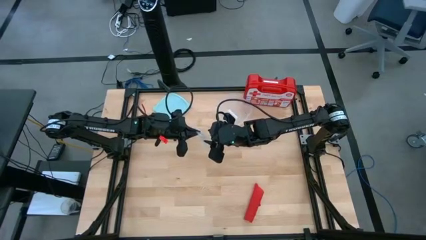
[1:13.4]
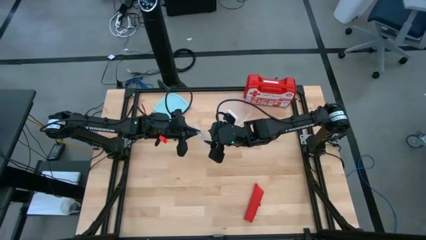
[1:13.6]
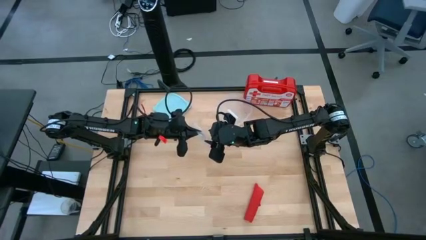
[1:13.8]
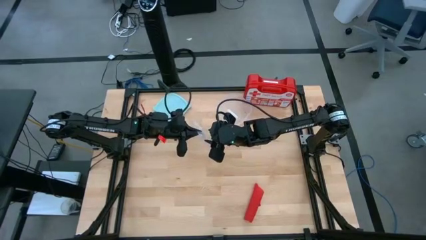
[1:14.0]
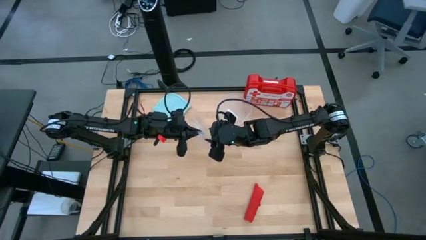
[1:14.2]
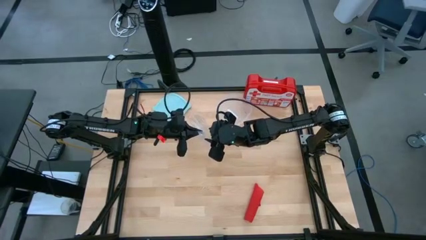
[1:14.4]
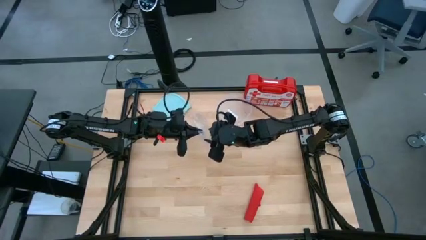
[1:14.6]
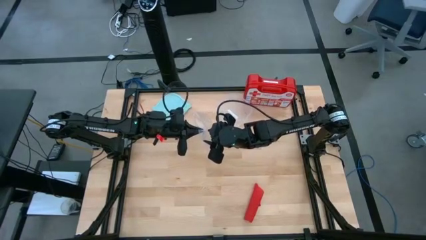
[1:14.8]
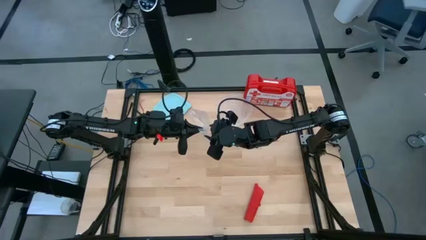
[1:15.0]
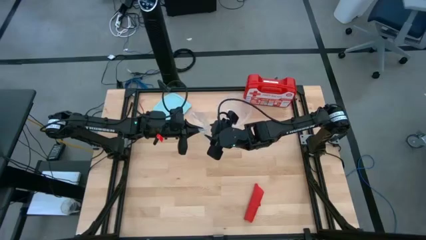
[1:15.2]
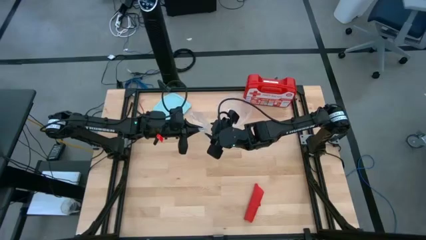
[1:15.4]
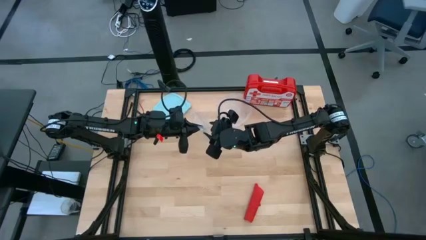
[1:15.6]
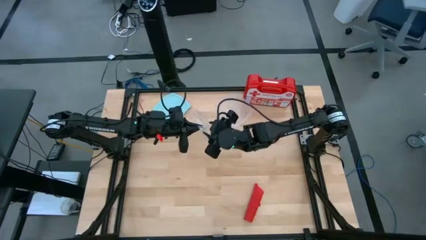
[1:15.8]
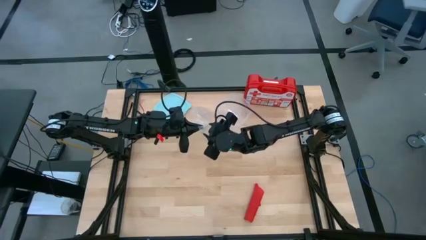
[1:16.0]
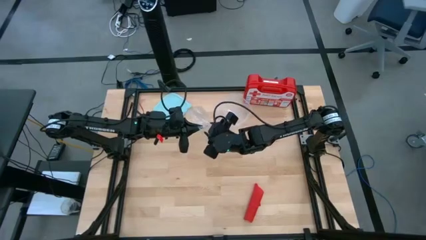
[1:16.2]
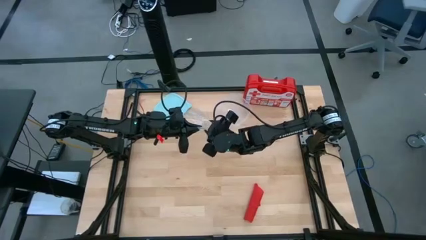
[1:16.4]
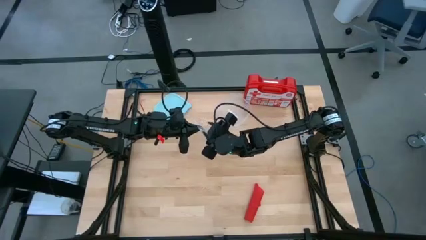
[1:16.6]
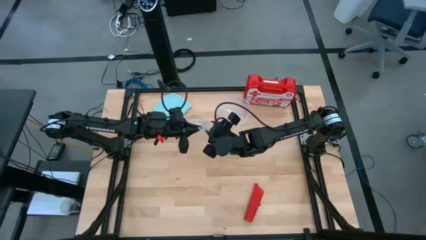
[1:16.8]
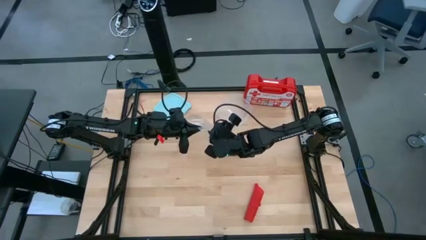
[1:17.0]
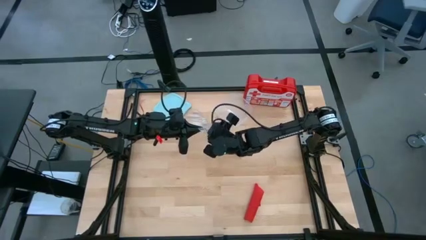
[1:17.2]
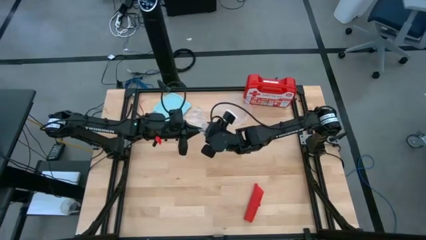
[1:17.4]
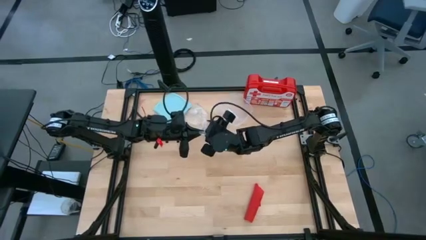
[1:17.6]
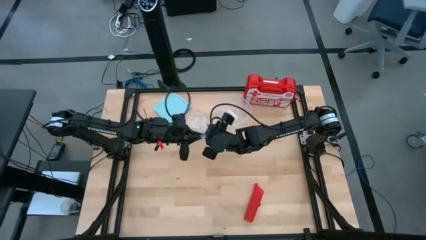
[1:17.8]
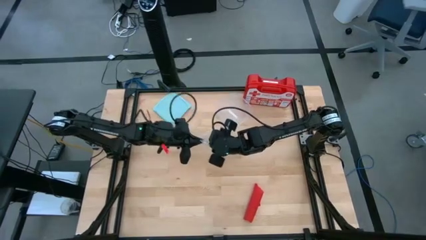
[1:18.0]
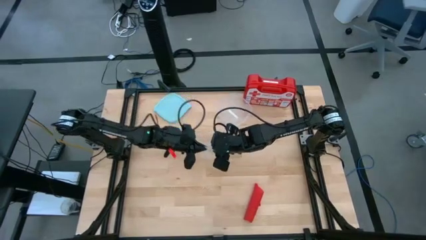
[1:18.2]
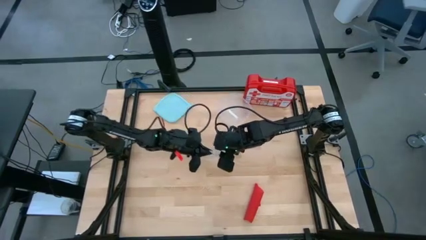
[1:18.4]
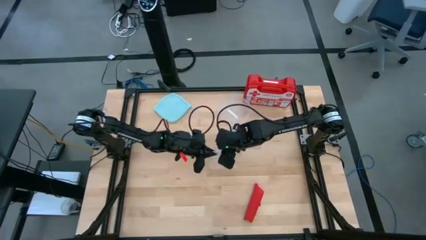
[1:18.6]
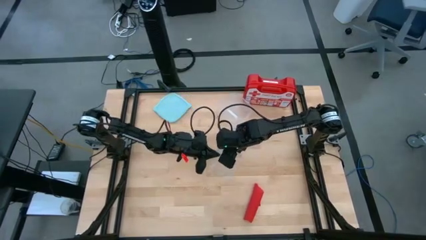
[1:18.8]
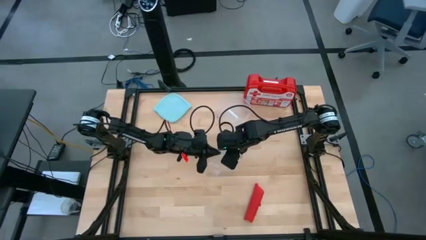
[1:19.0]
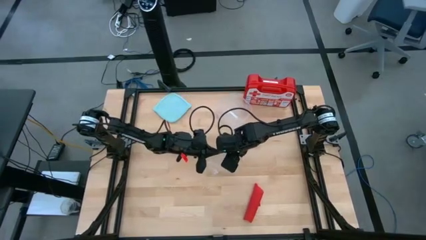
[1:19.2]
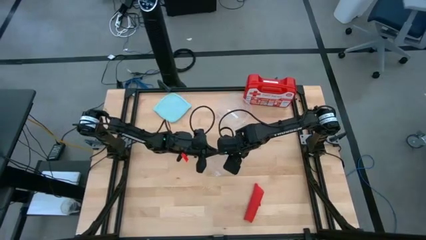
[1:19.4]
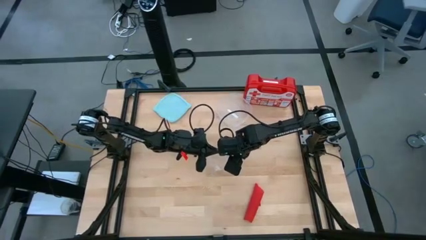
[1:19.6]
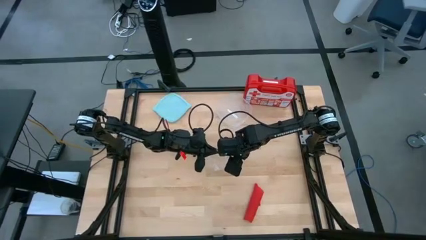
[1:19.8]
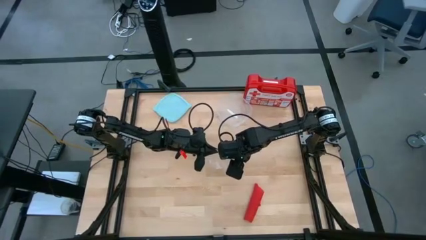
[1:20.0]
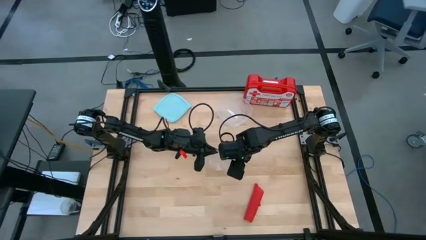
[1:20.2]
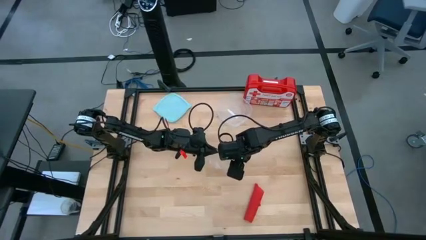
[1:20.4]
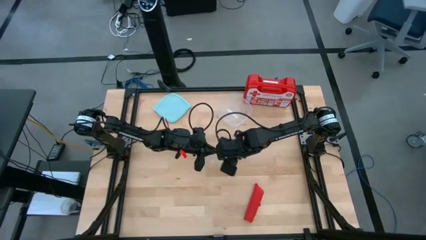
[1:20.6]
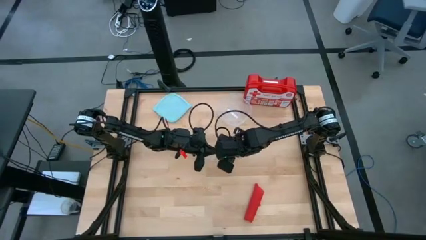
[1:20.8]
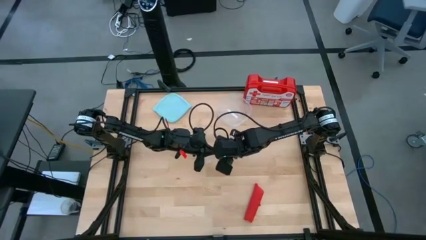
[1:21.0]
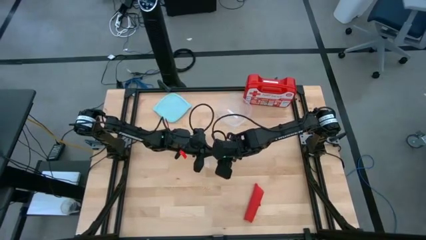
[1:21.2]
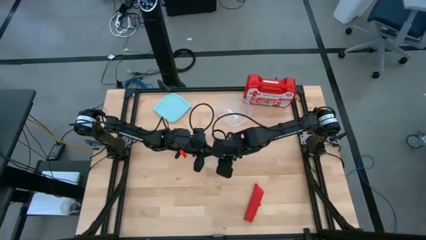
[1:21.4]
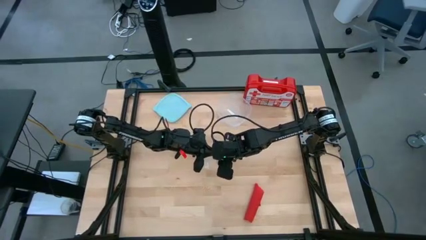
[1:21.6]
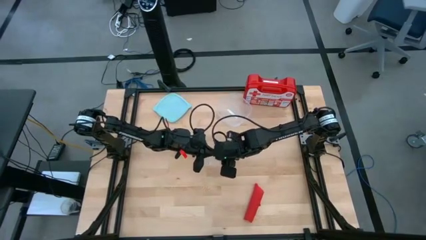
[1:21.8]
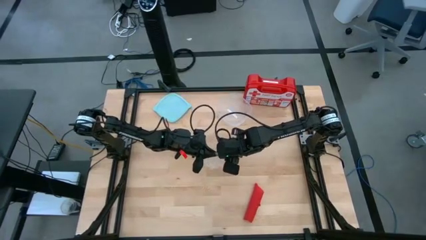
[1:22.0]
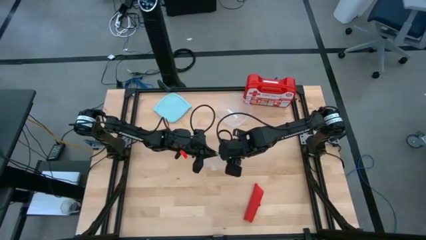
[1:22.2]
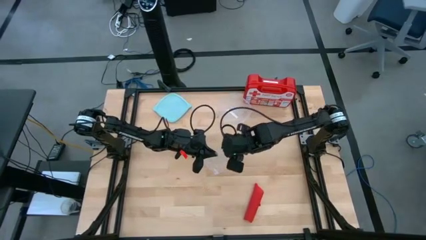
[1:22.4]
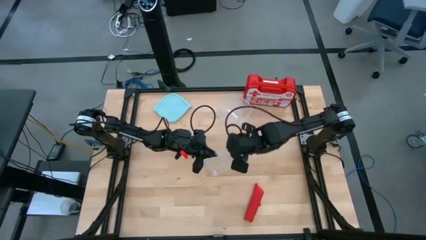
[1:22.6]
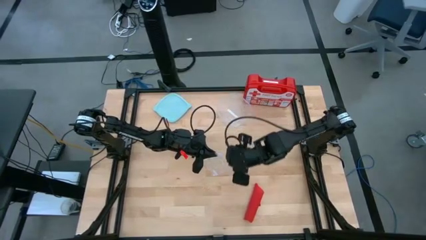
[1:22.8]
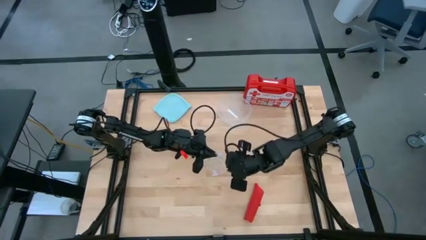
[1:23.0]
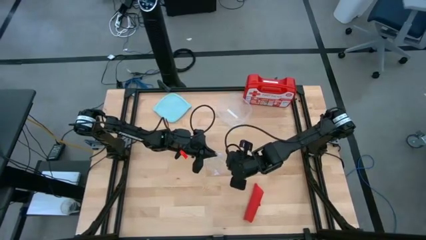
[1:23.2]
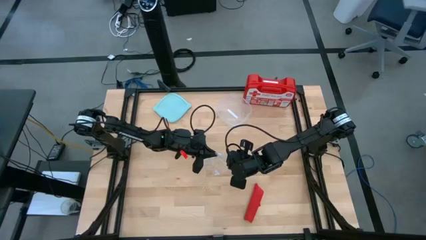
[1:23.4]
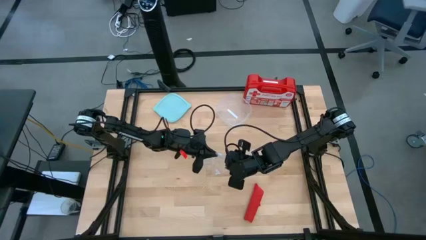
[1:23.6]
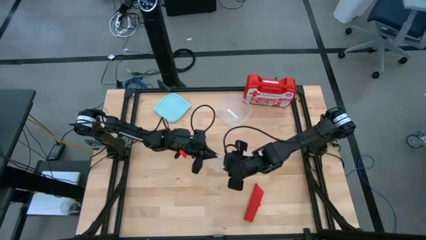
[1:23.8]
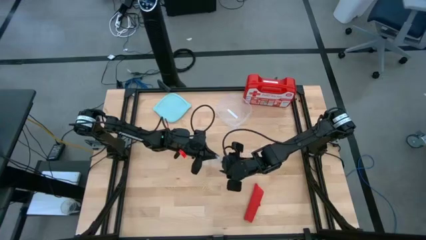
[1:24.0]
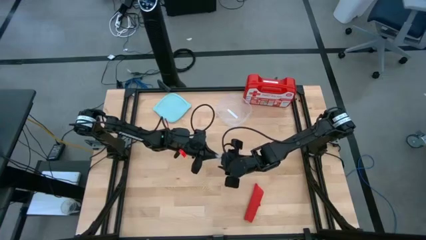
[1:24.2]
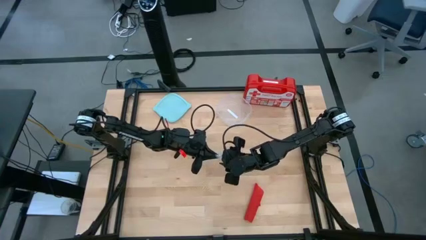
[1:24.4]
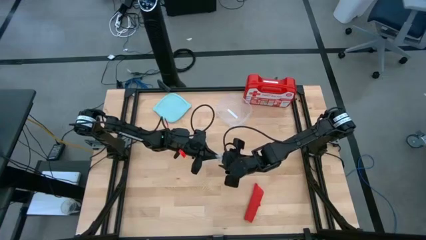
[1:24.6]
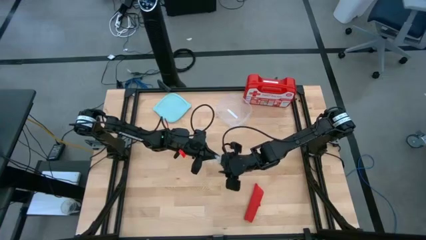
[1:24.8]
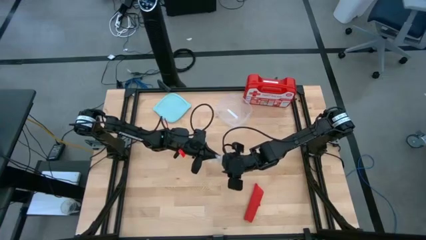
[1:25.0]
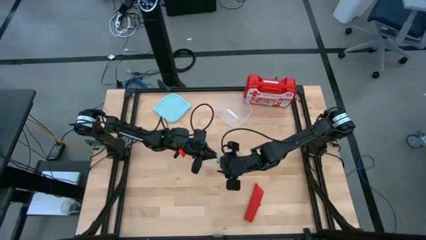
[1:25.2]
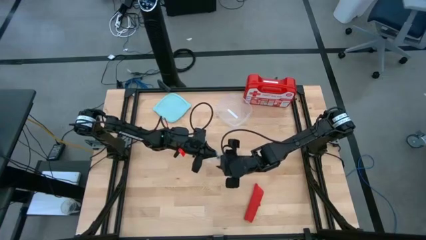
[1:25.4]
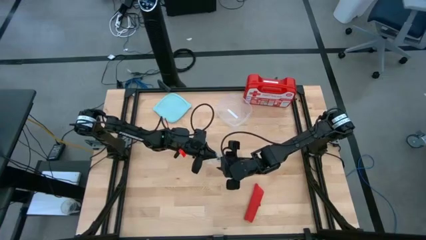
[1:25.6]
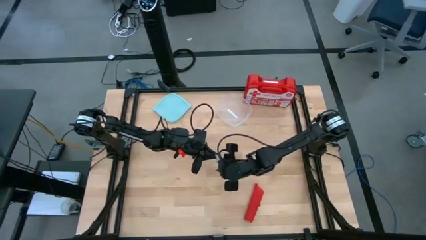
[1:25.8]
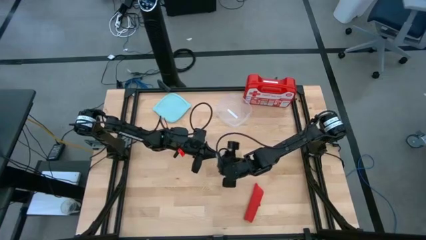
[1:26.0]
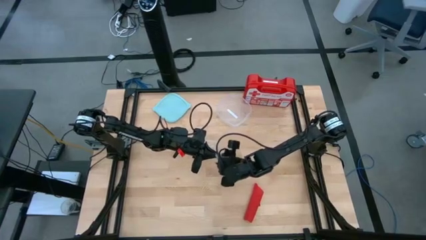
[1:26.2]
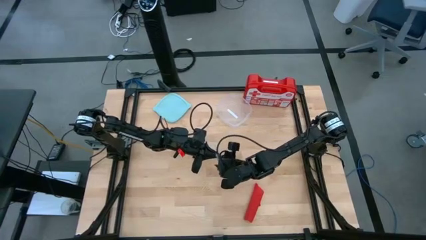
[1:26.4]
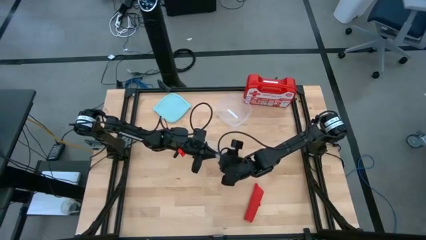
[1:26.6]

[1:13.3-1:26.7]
Task: Roll bandage
Open the transparent zip bag
